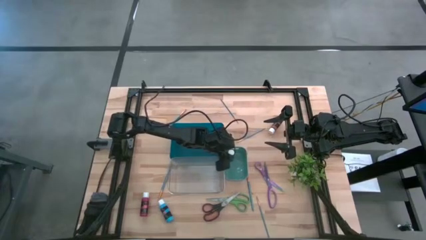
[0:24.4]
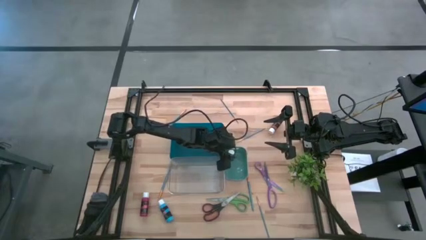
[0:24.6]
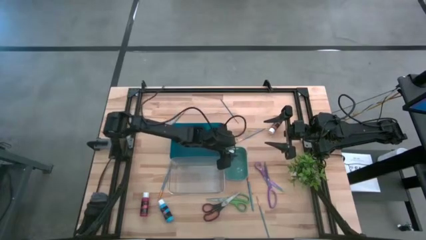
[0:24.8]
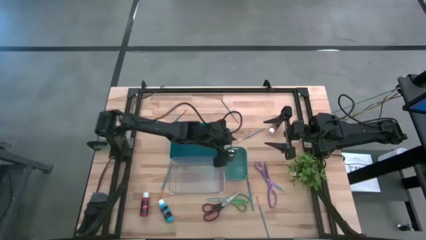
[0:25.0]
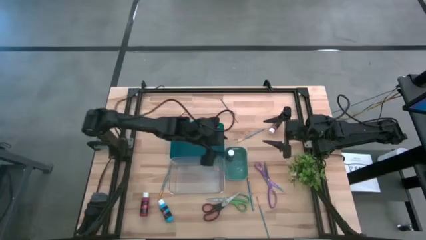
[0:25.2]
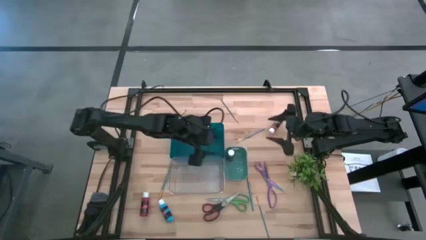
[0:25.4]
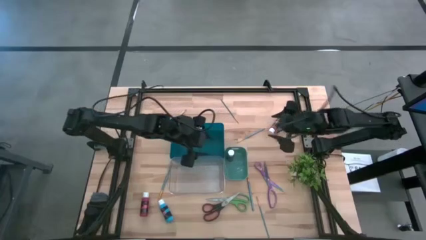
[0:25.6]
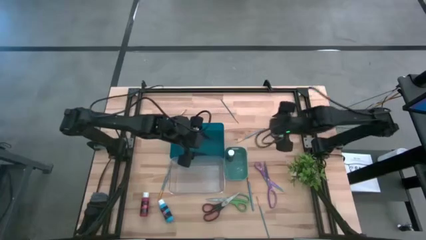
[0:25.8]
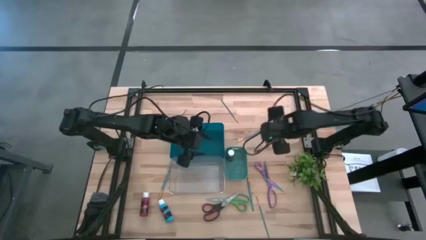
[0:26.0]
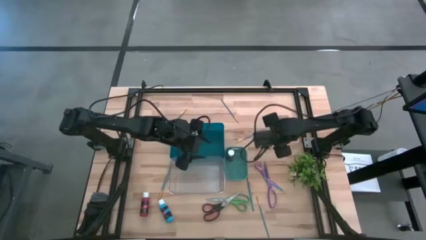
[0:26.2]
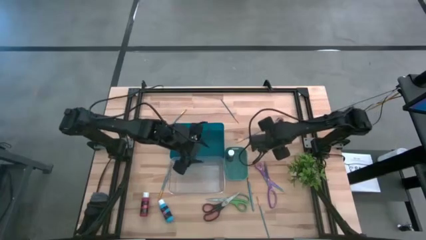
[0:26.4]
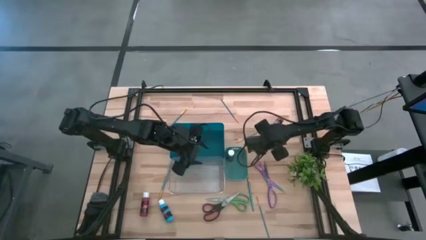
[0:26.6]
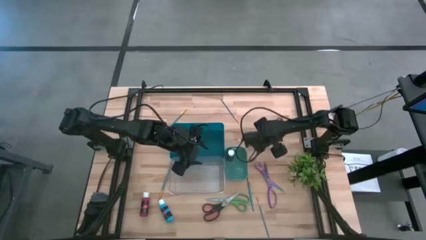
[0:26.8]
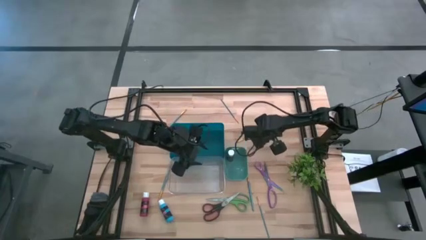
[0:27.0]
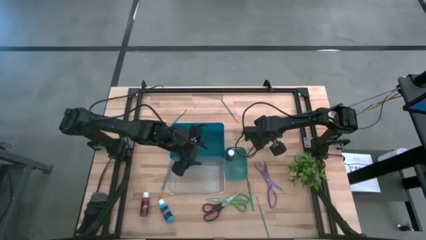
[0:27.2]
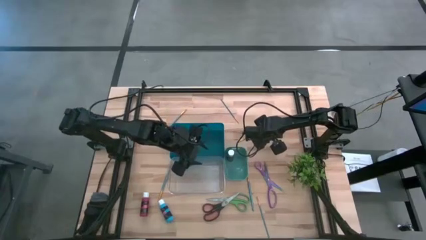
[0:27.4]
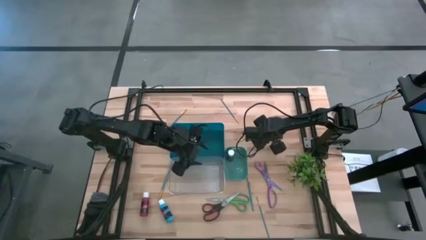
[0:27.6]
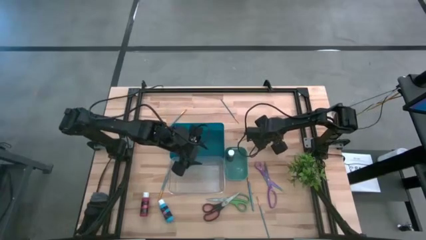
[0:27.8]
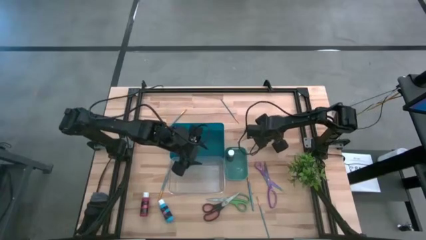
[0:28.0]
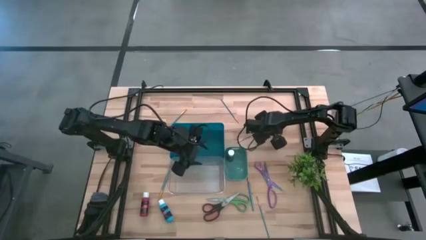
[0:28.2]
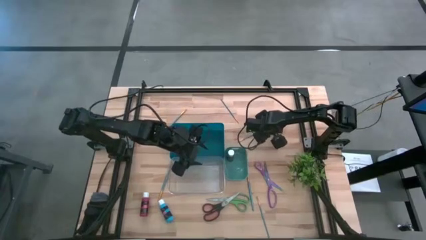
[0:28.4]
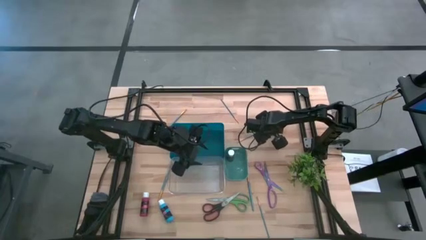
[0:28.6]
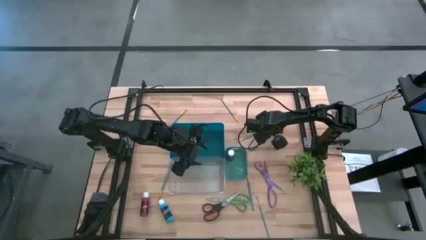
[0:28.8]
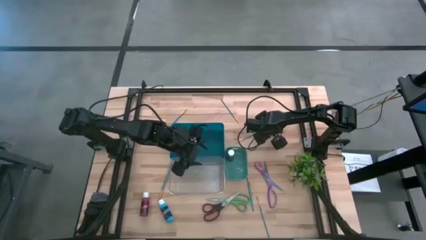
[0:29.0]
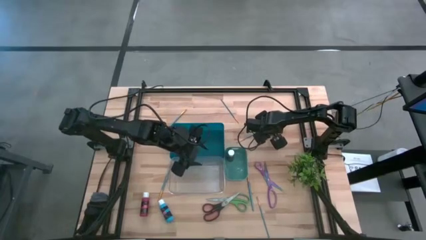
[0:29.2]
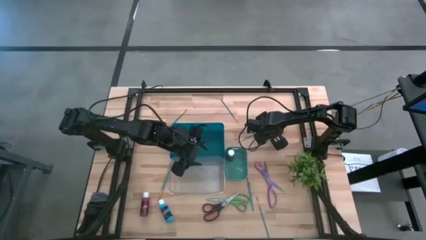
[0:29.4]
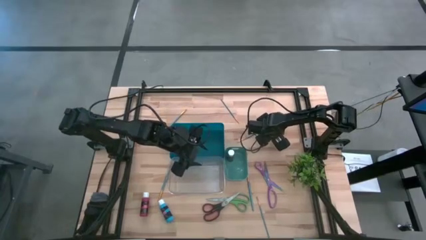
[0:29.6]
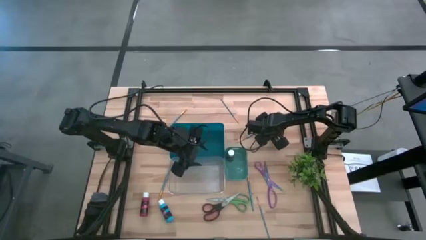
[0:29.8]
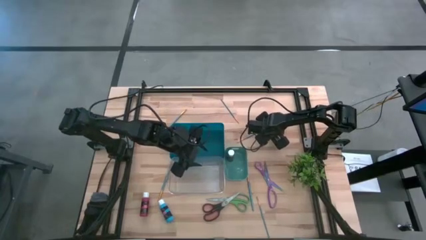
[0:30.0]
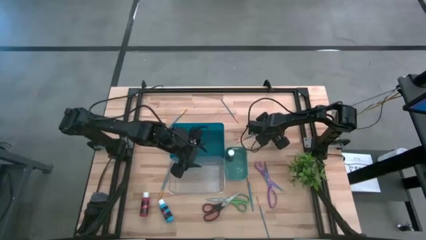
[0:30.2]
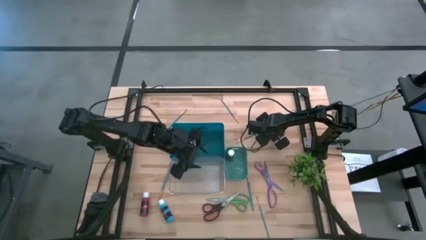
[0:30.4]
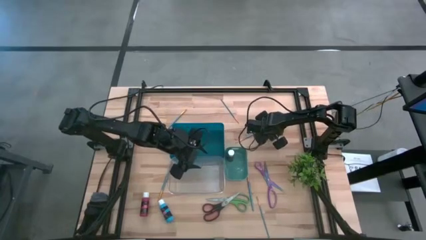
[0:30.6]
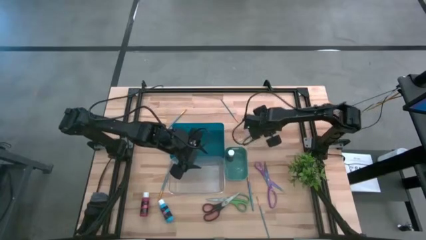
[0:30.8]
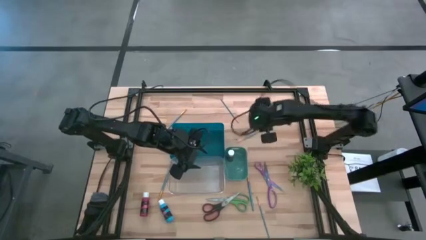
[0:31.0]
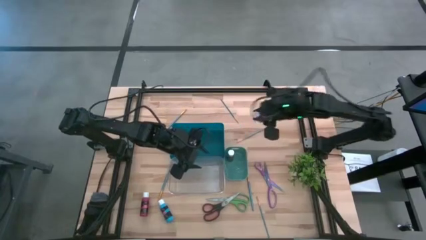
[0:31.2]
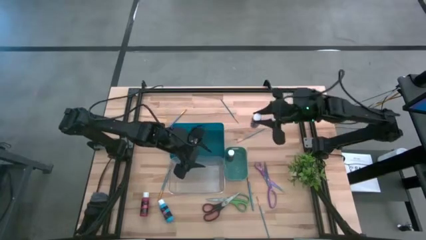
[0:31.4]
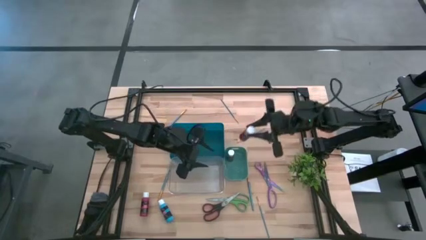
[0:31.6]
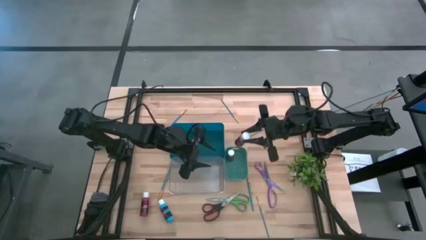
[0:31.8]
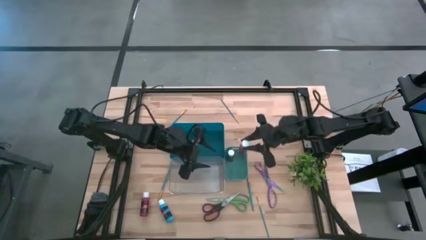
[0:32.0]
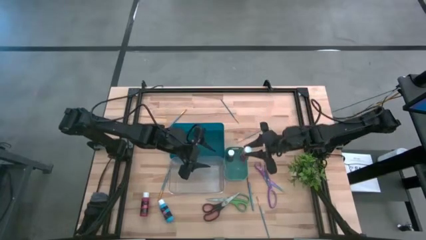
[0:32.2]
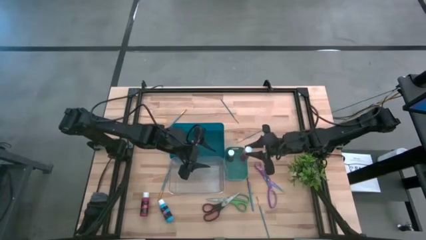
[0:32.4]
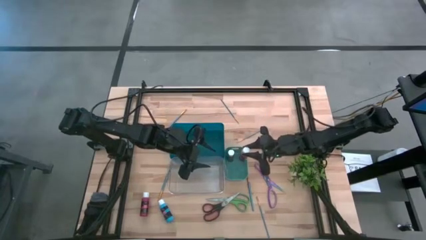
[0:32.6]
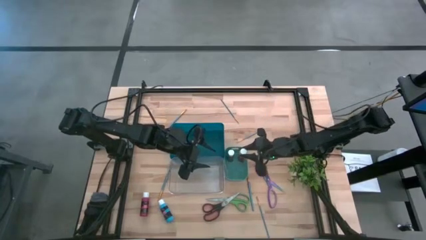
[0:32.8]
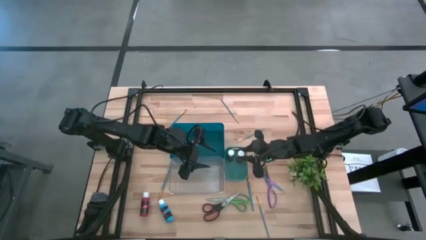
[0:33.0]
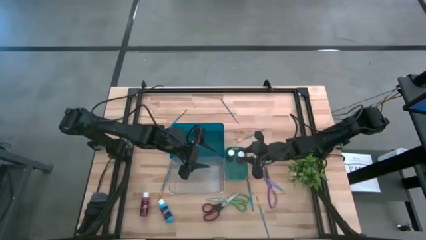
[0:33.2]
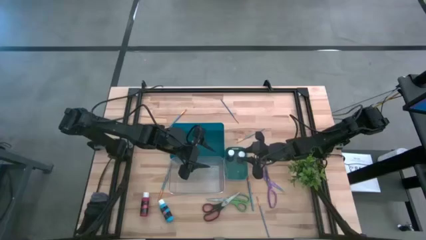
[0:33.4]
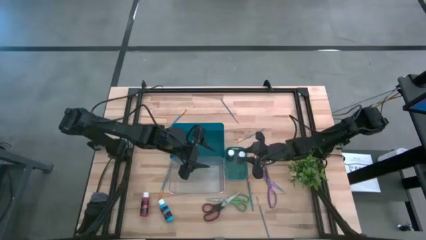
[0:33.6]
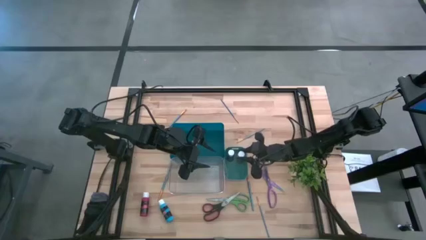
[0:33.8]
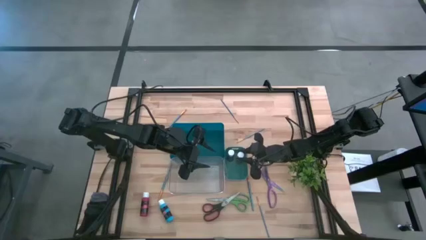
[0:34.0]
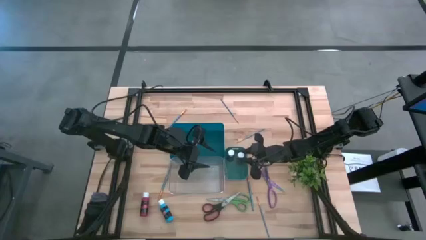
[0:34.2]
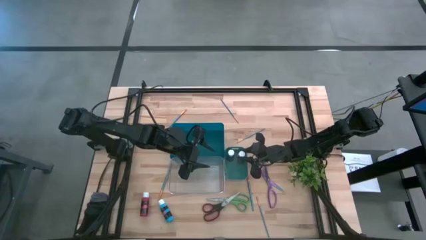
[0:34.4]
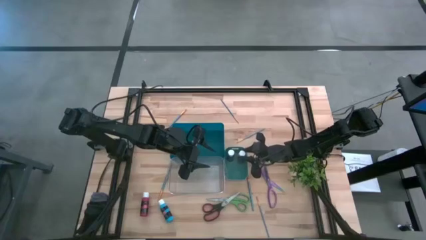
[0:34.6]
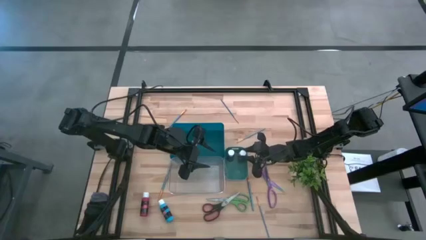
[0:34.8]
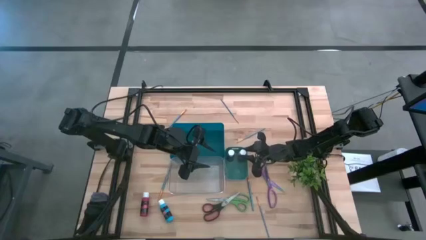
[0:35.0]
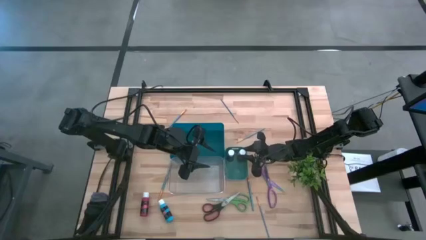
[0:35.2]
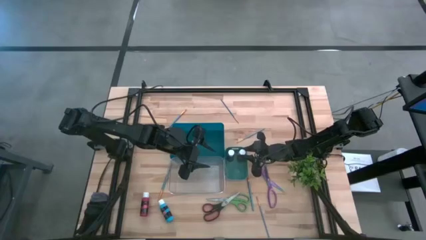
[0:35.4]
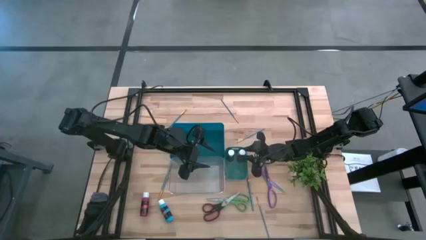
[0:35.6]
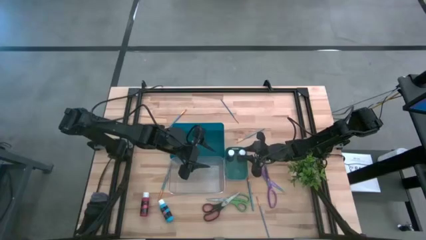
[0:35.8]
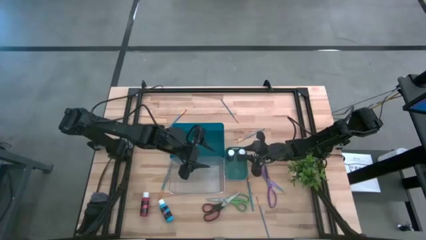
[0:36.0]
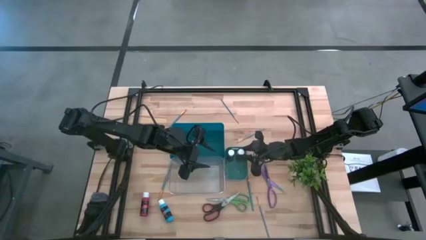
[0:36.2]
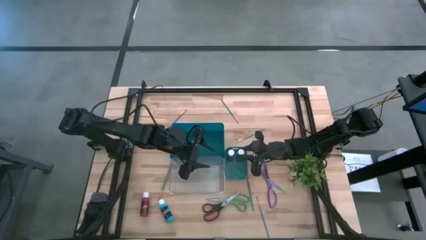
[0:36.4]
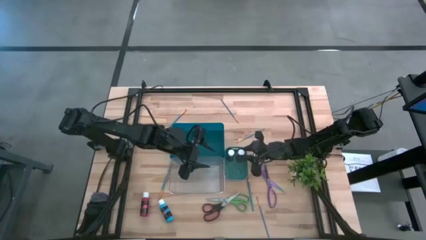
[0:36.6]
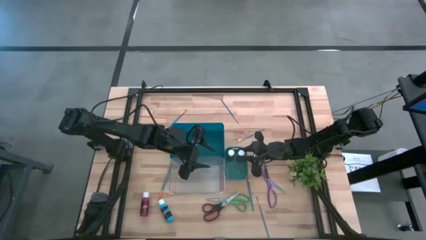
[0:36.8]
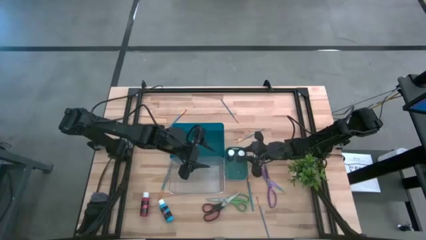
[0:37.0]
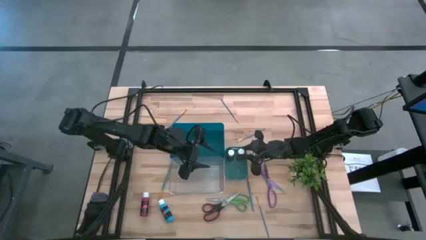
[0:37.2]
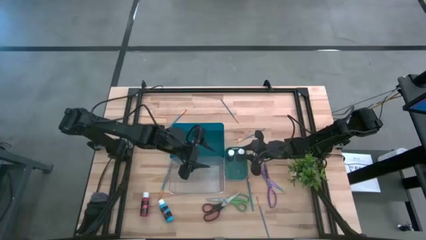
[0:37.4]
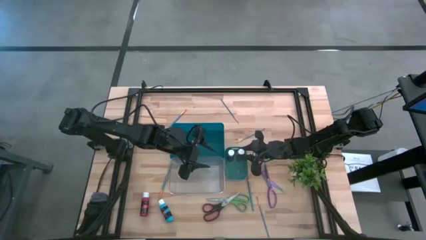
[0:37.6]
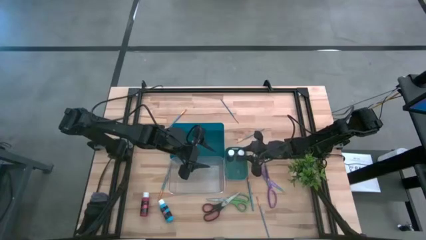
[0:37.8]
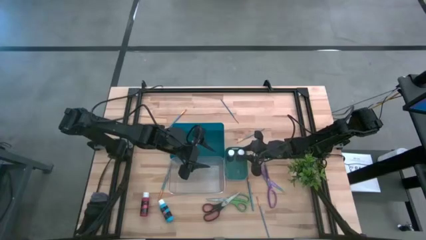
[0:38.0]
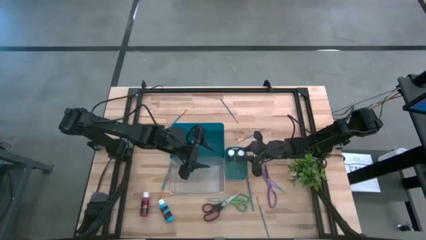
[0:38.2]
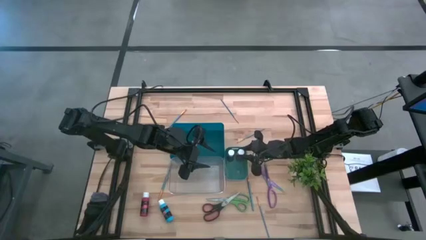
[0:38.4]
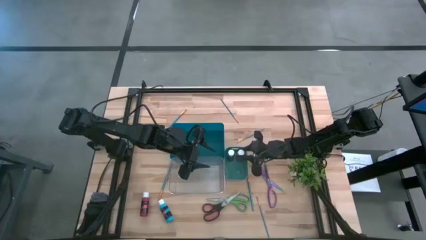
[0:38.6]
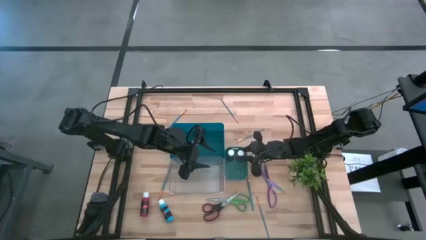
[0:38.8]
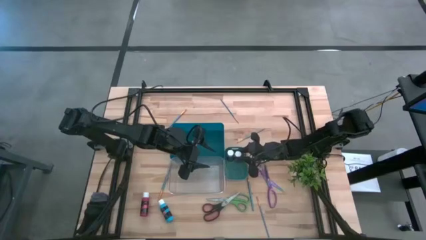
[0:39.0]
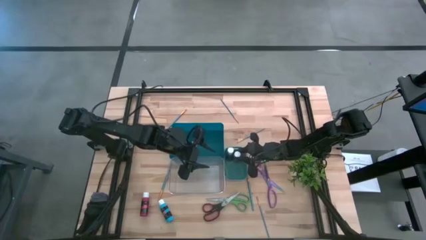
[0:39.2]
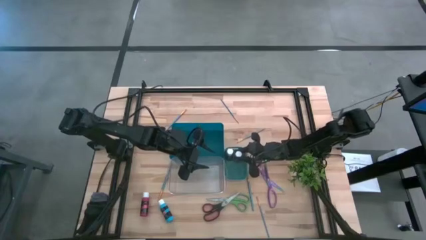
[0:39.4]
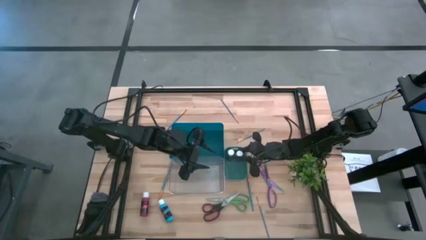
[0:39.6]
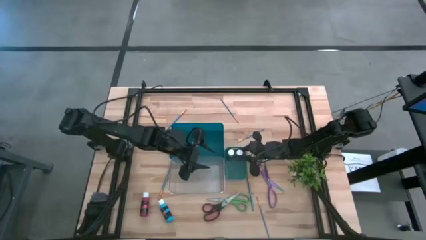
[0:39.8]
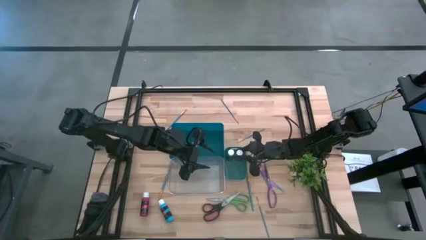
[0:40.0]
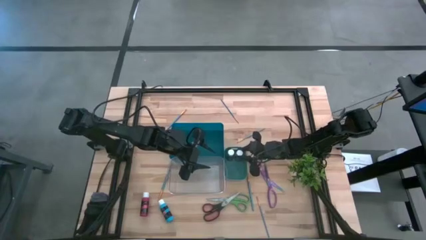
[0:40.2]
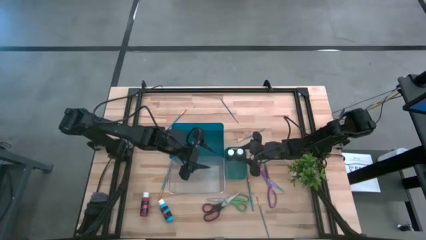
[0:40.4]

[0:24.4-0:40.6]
Task: Pick & Place Paint Supplies
Put the brown paint bottle into the green bin
